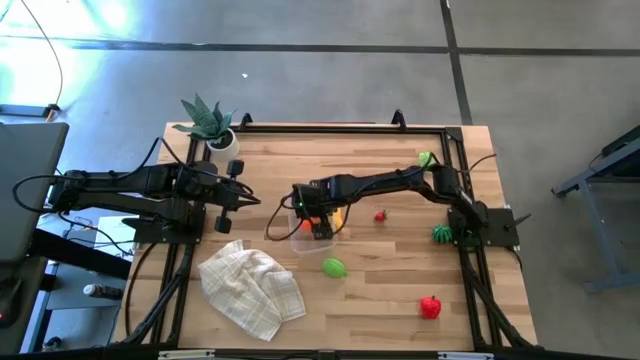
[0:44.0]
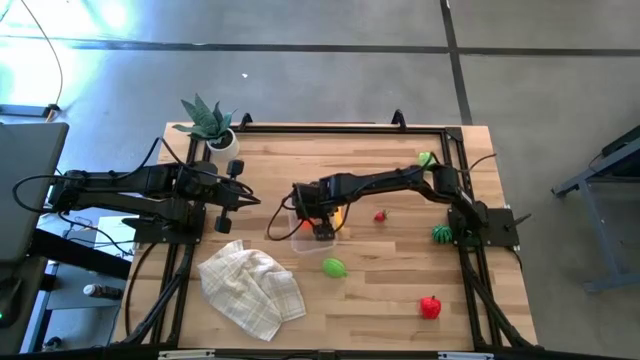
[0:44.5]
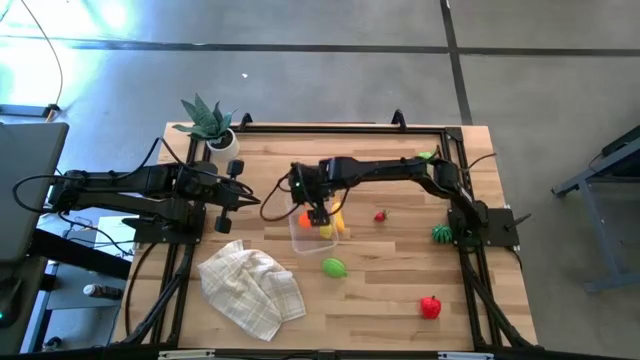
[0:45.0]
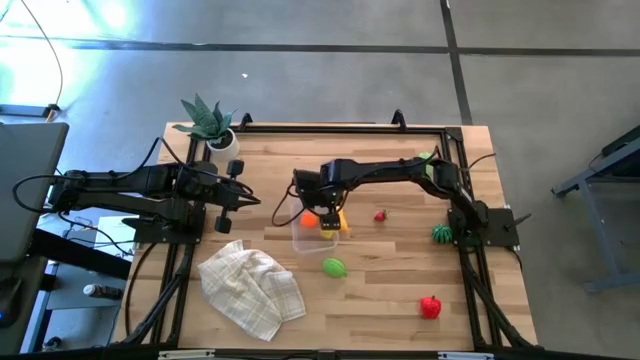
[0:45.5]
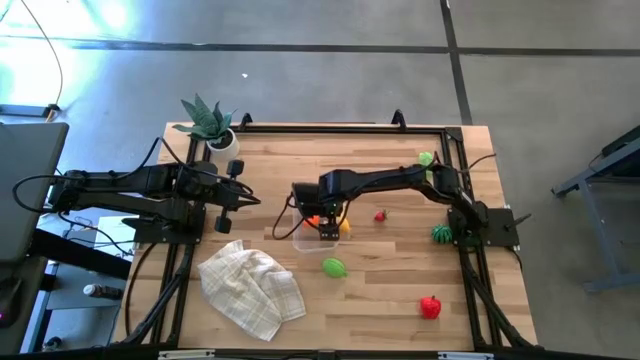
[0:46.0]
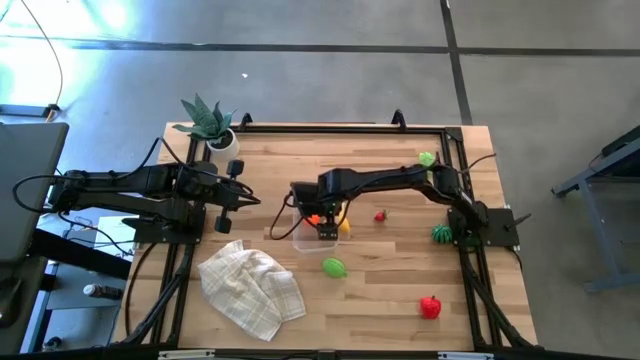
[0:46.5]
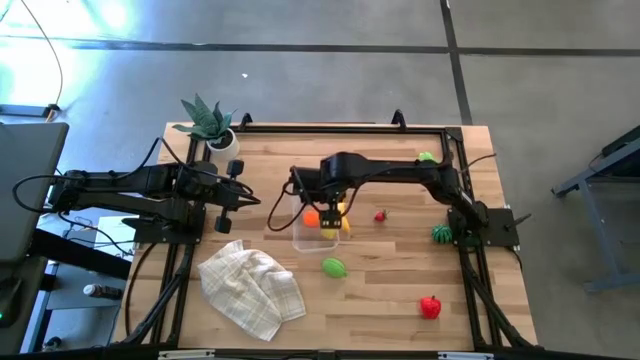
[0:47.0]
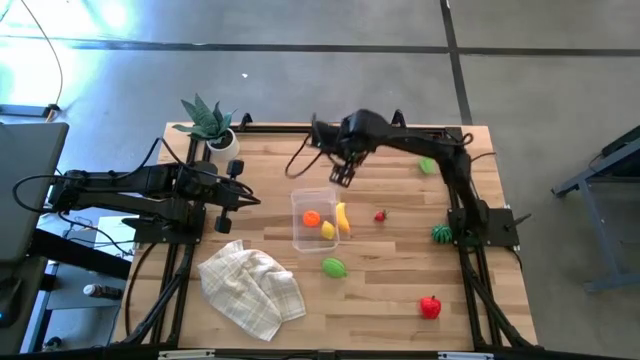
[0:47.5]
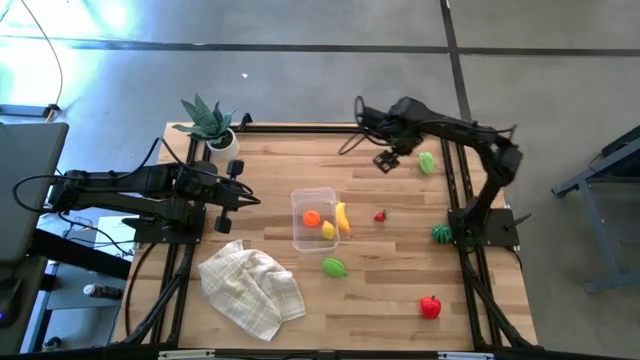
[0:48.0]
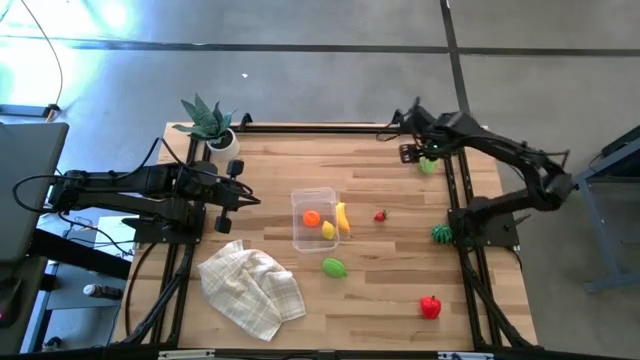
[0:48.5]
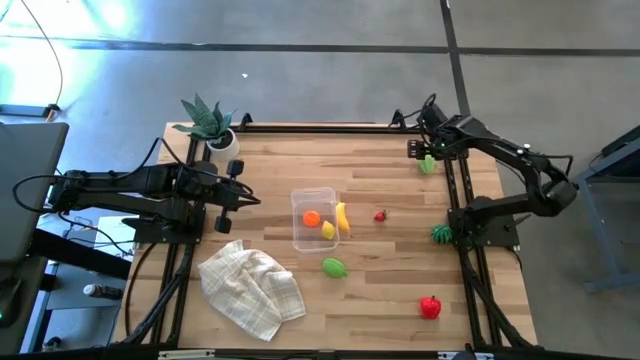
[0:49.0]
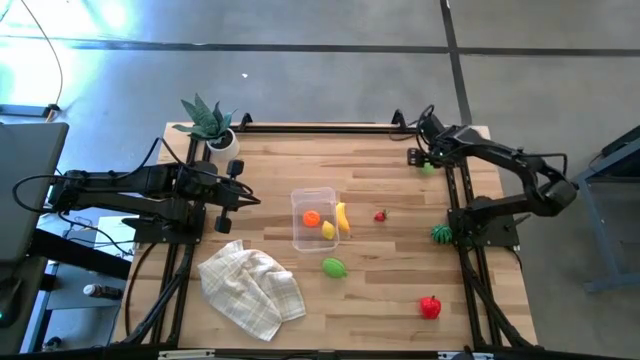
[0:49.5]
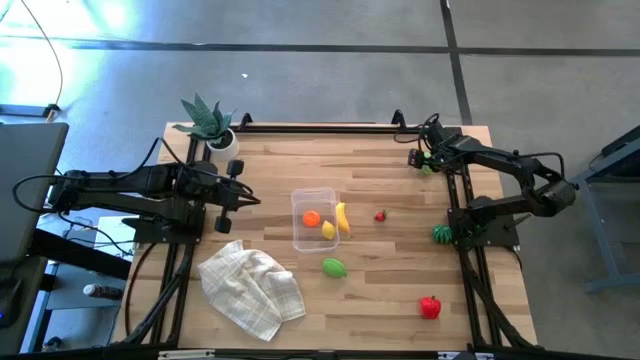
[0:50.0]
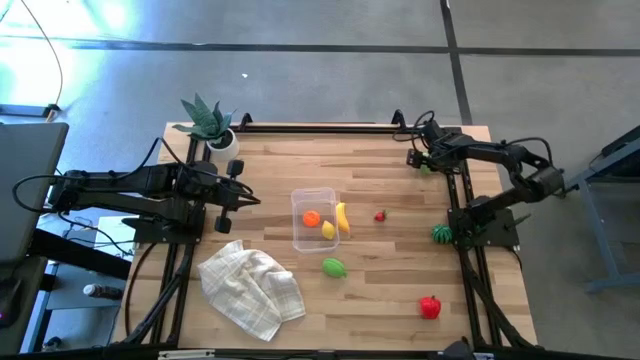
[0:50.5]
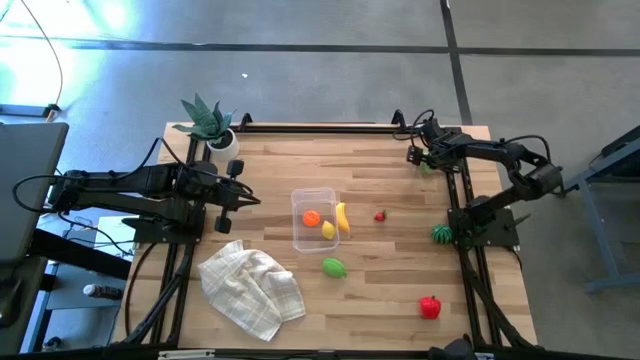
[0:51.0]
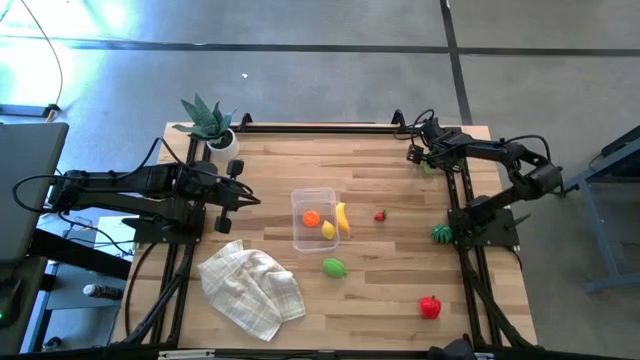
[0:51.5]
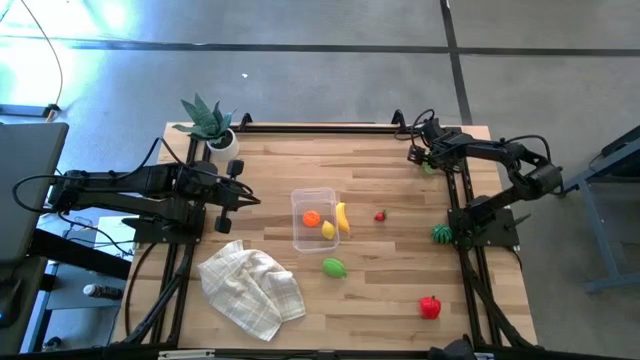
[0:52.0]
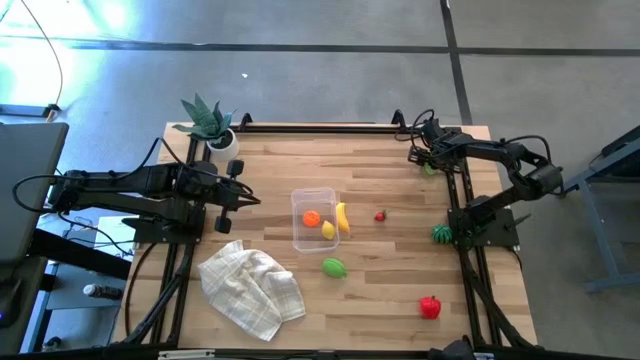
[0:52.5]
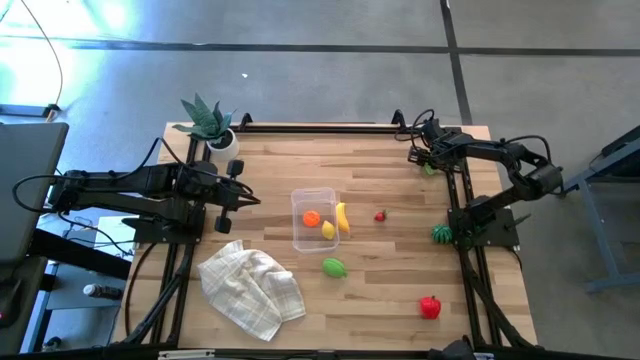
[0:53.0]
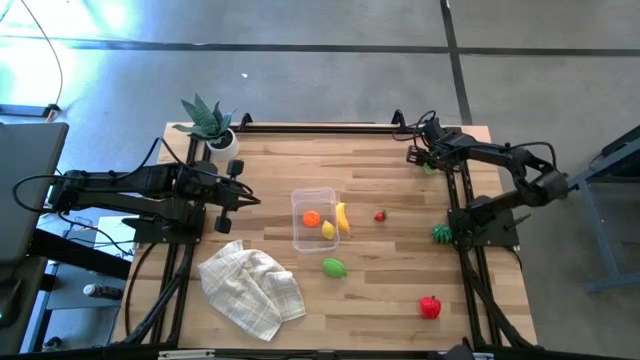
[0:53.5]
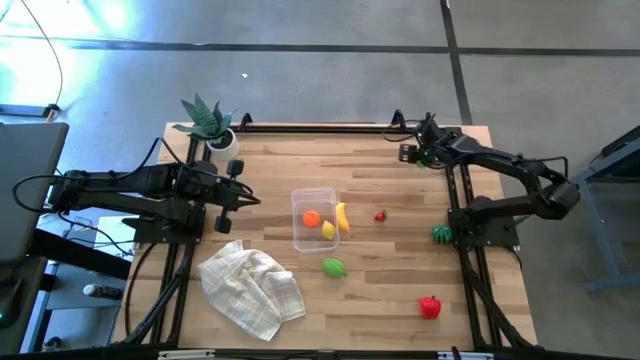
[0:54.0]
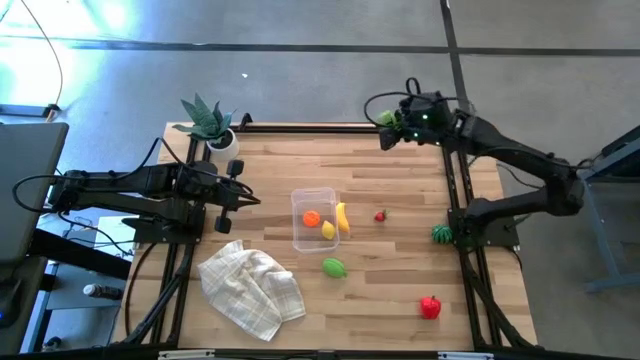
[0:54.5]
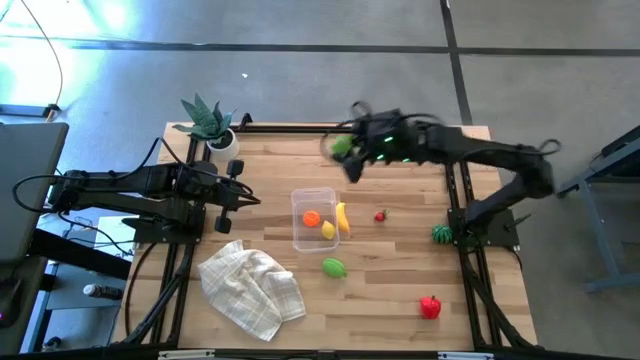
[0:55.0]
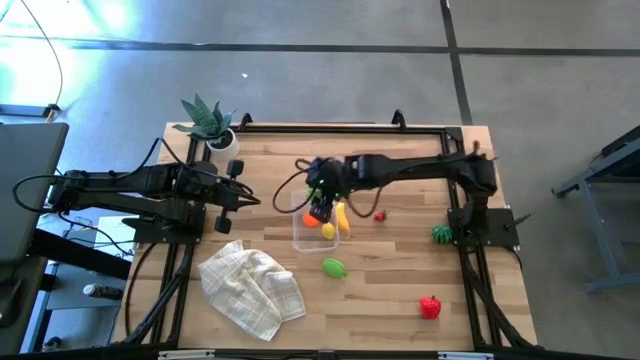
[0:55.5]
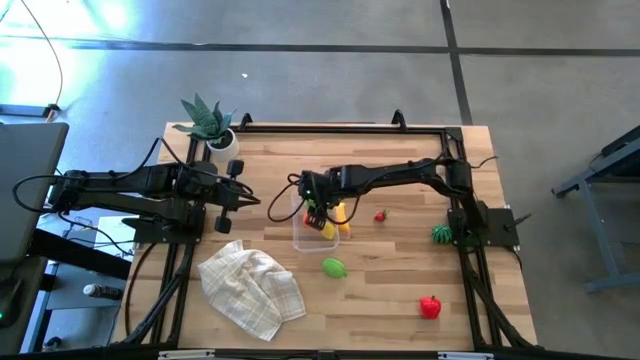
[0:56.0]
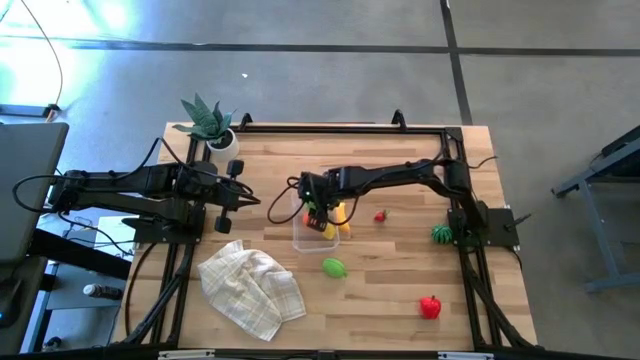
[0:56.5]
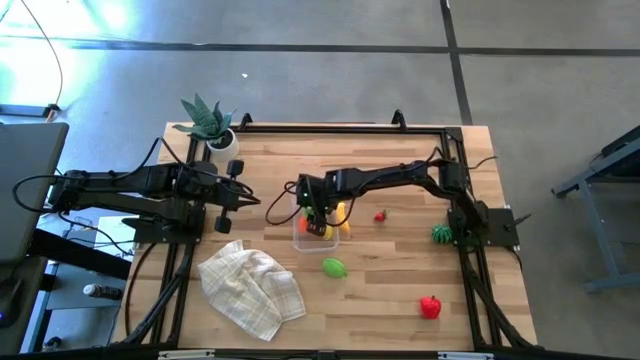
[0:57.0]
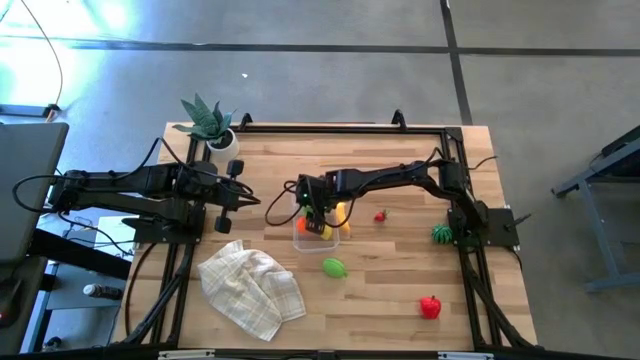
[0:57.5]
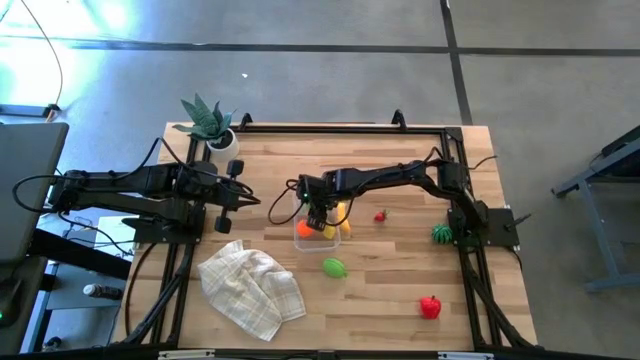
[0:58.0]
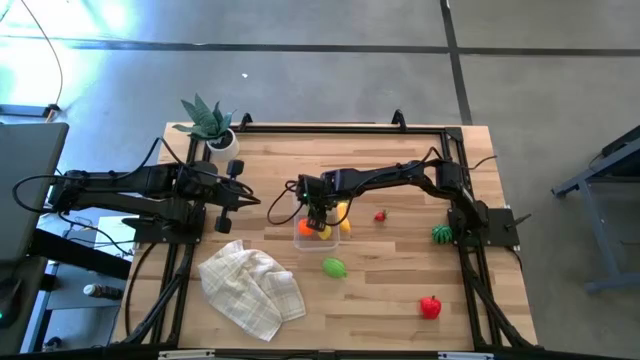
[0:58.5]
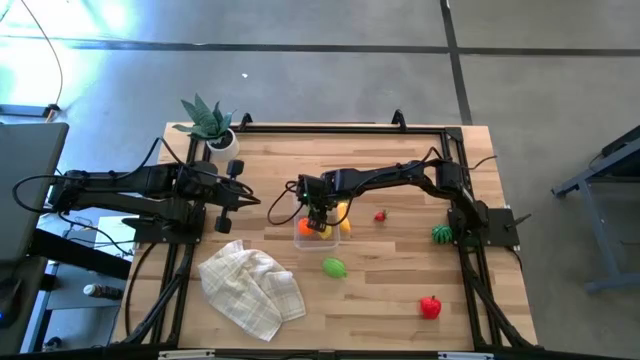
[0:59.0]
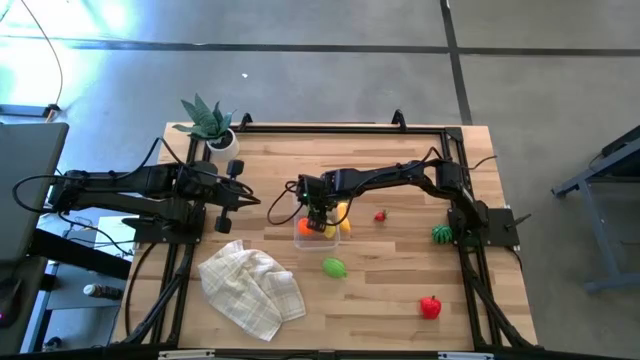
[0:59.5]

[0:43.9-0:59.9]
Task: Pick and placing Produce into tupperware
Put the green starfruit into the transparent bin

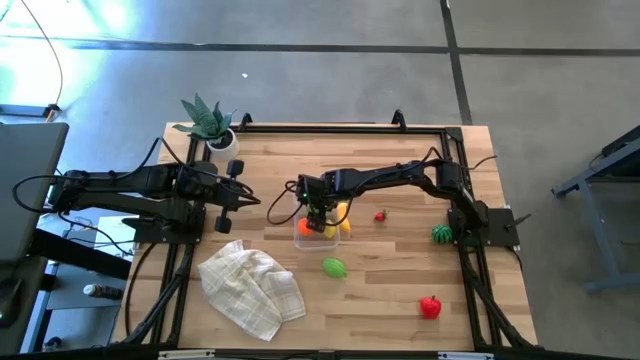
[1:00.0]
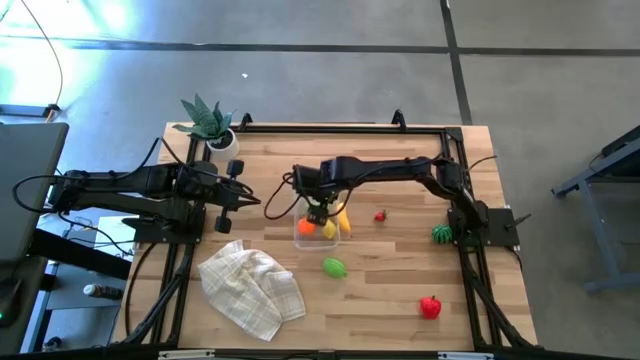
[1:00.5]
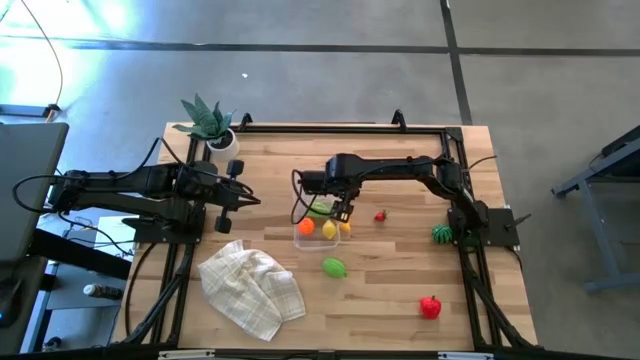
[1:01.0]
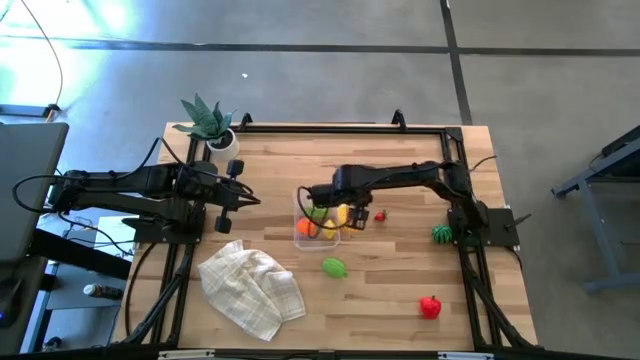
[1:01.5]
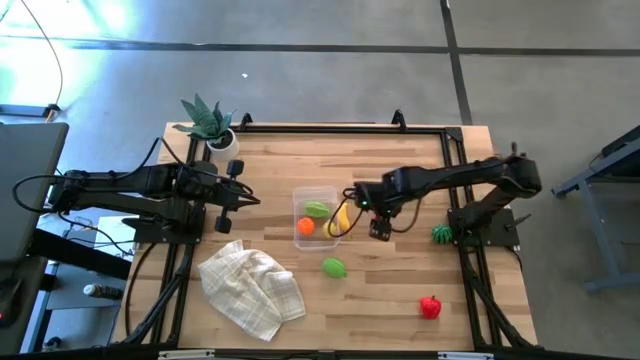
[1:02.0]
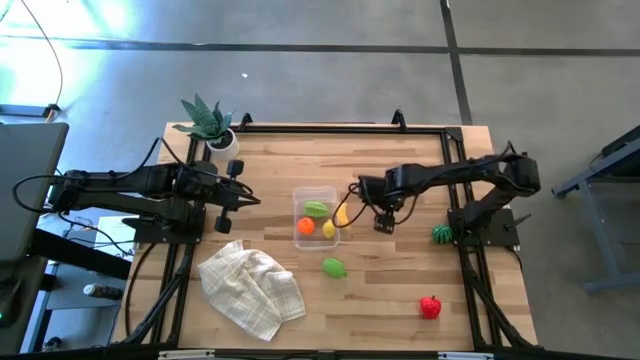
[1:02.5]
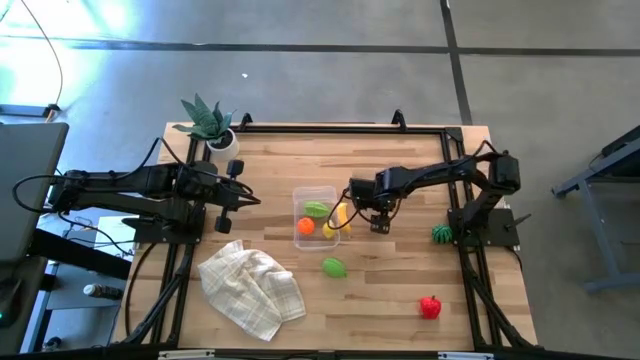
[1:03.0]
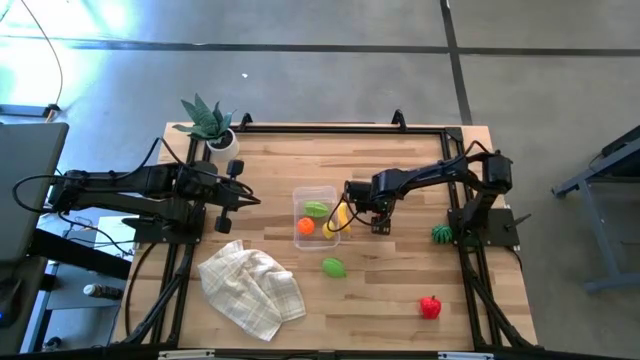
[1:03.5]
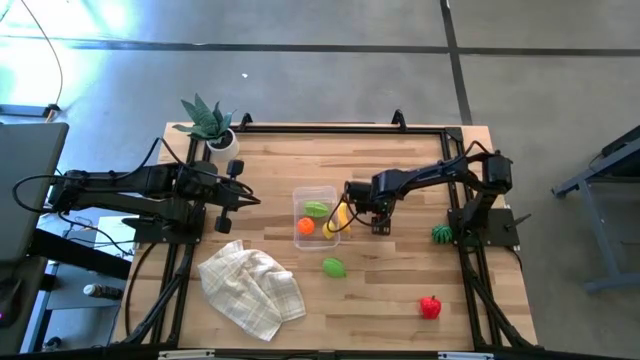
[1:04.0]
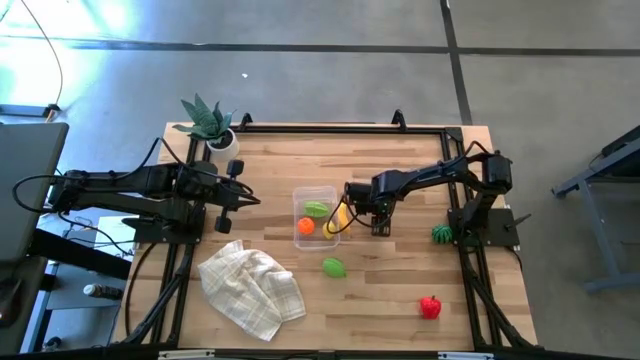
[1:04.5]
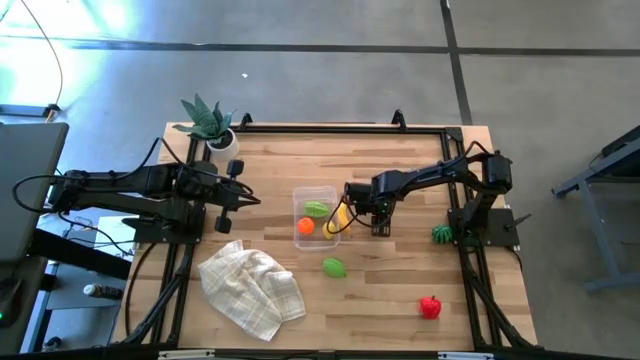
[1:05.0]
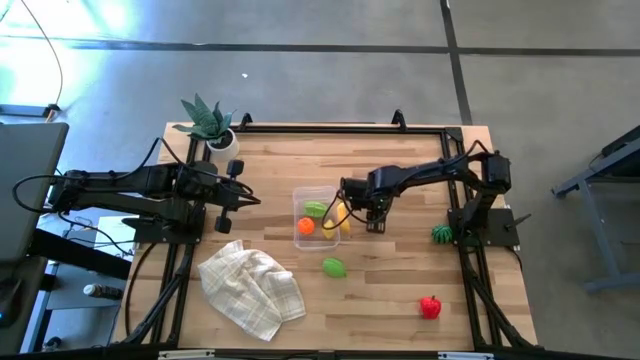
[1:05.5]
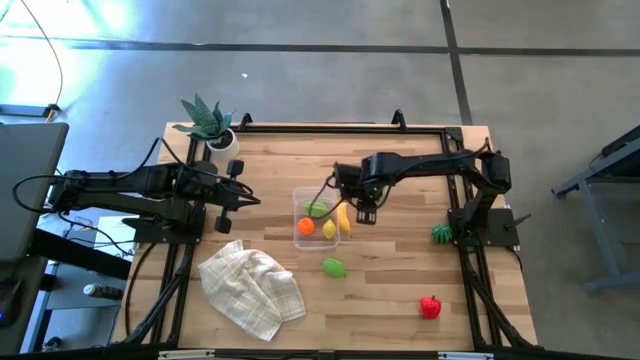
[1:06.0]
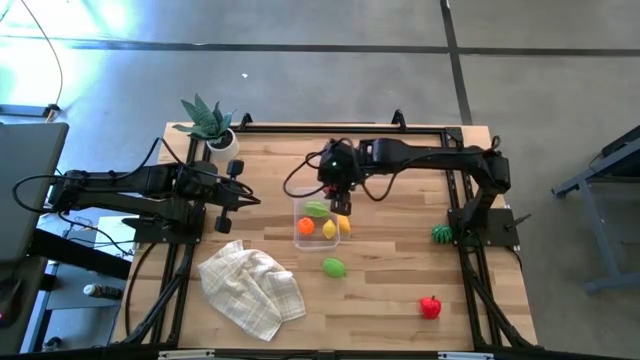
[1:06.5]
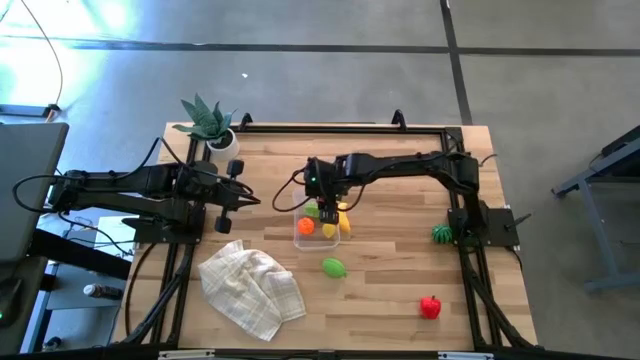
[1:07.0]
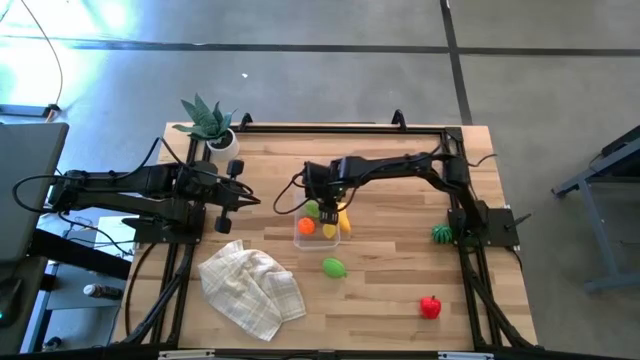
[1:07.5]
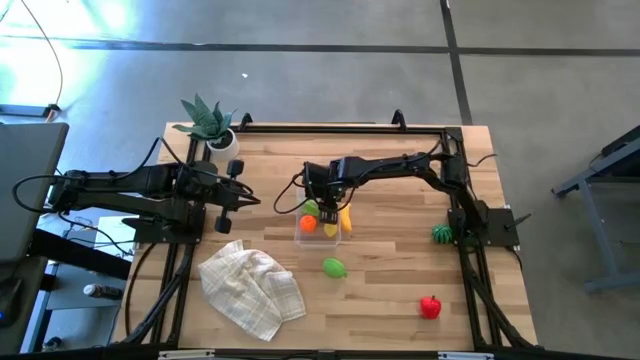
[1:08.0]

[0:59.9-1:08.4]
Put the red strawberry into the transparent bin
